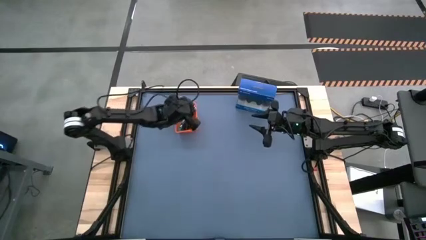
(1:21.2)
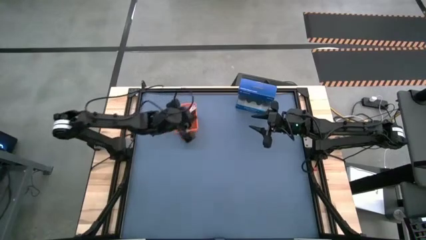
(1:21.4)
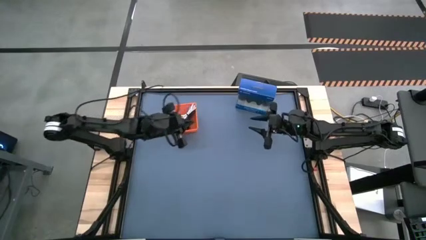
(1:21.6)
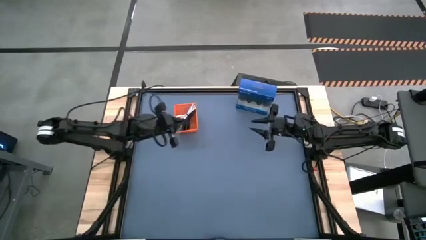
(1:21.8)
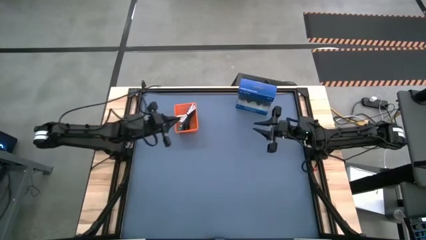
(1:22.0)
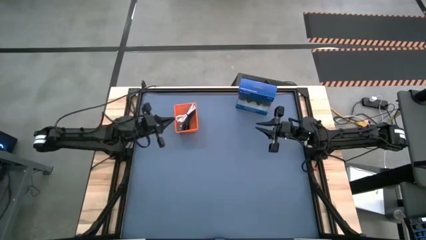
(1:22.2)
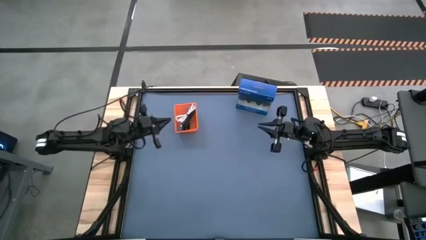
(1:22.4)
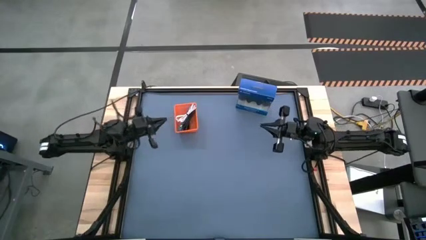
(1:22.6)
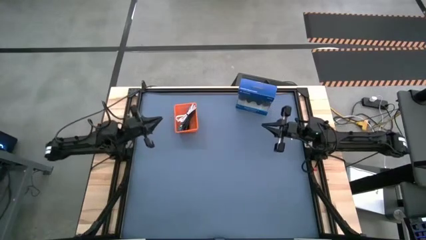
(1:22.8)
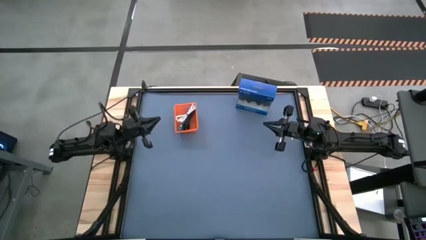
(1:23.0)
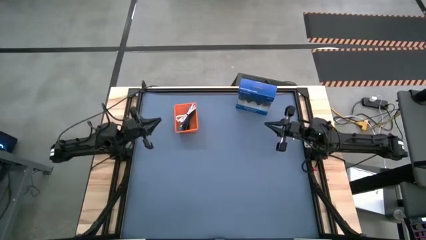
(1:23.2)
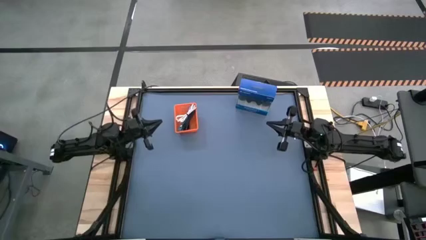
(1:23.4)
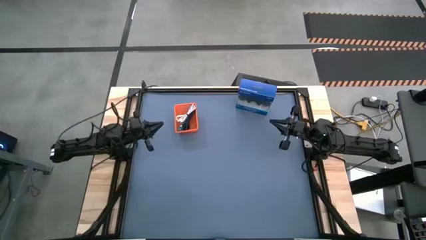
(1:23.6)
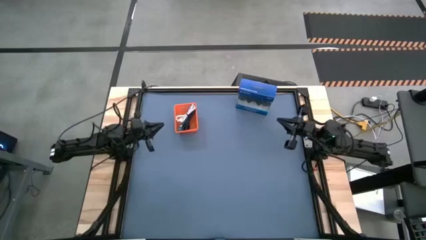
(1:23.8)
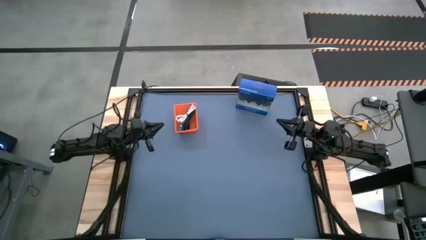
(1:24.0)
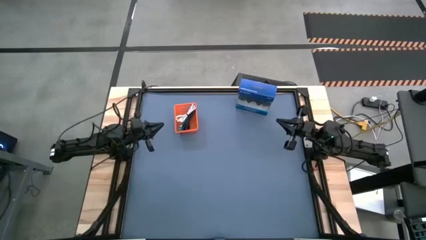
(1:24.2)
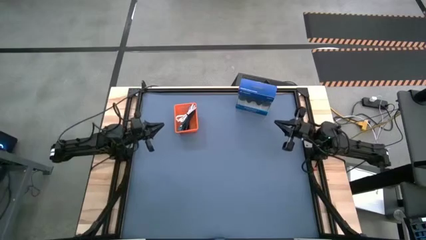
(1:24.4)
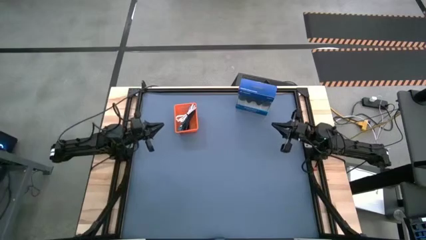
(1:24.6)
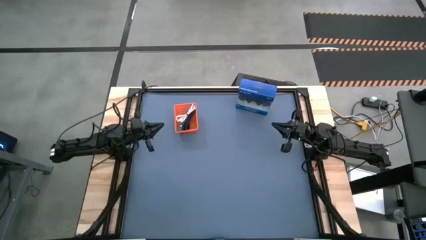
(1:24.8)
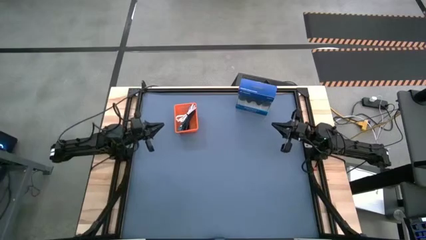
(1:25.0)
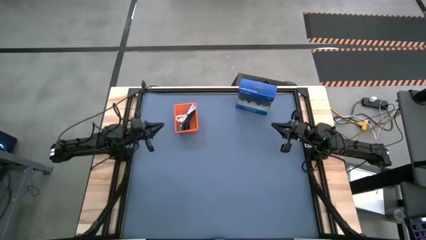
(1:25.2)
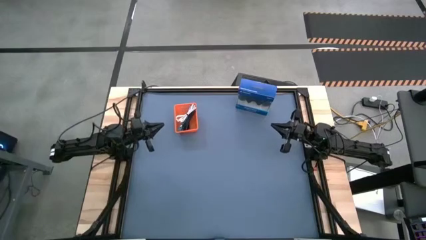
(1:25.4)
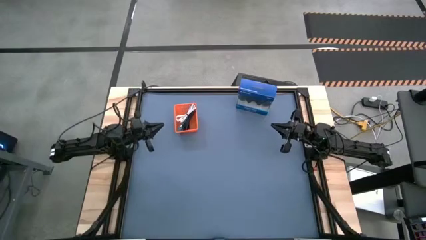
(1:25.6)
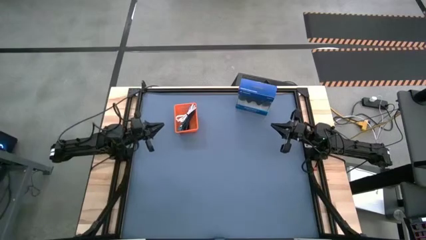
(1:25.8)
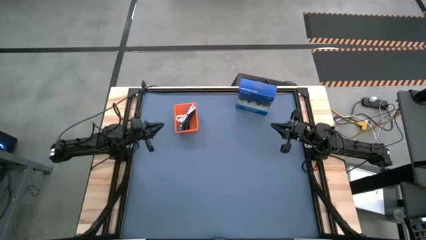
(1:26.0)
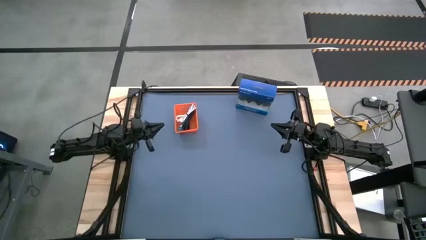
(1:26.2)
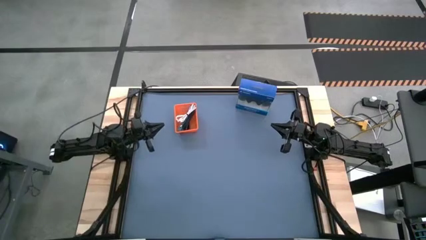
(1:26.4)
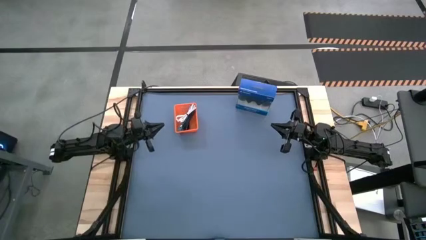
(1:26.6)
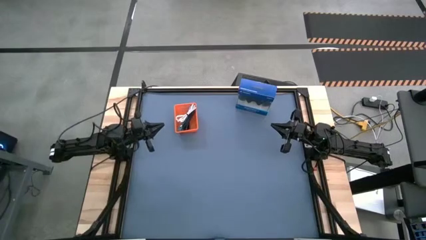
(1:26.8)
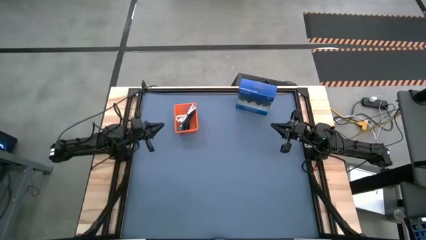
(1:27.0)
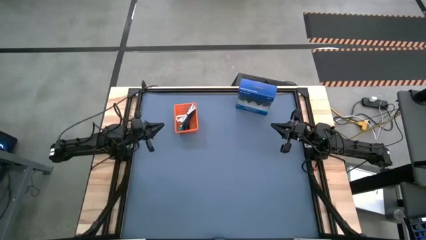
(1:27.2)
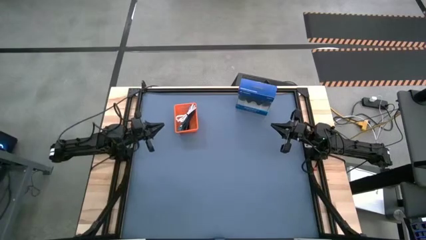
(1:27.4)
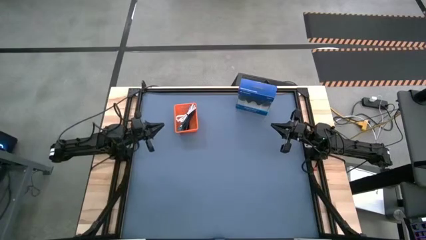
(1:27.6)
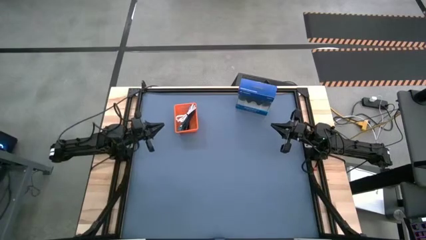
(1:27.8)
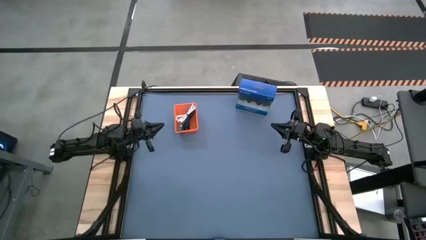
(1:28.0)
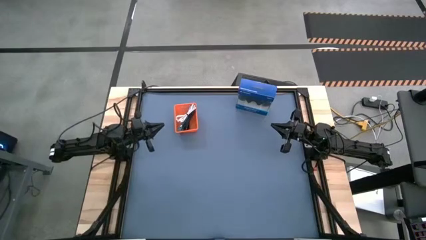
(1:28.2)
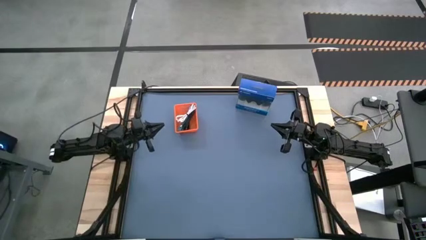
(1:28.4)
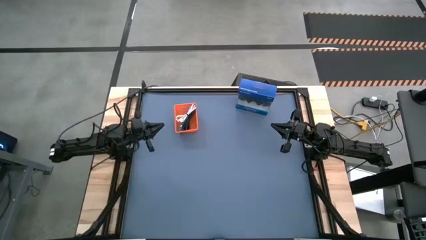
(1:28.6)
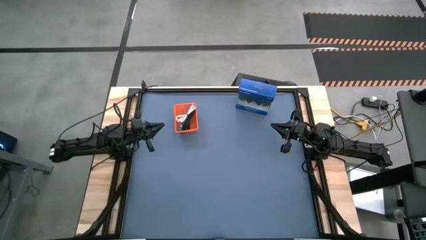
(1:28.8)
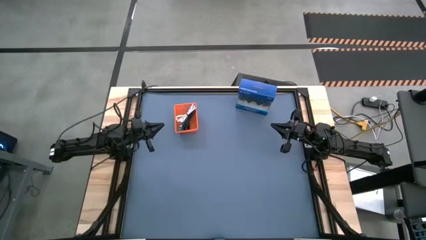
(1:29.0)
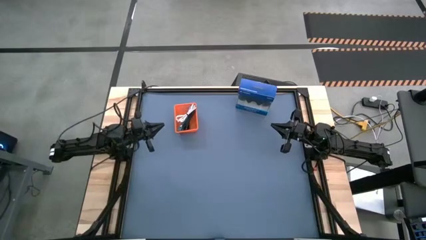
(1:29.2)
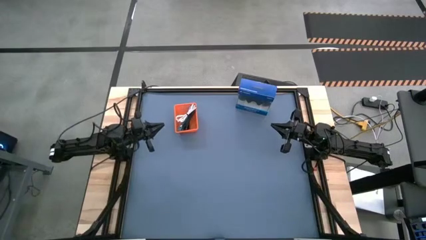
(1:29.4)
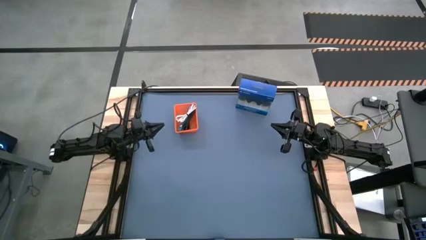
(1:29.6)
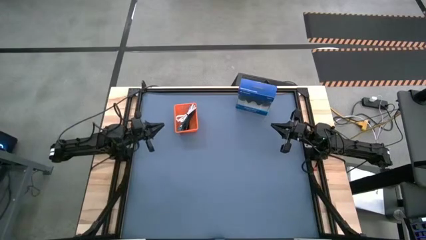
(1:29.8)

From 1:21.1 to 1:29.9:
Task: Pick and place USB-C Cables
Return to Home Position

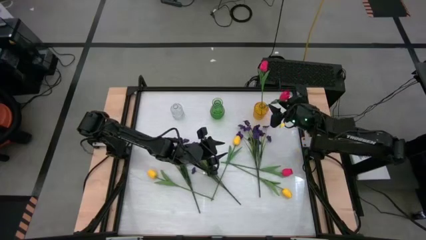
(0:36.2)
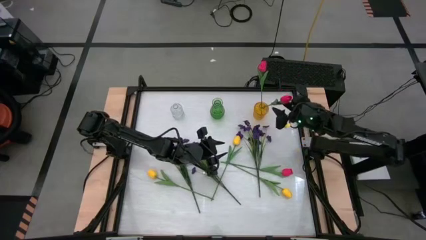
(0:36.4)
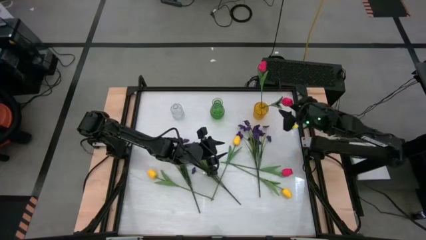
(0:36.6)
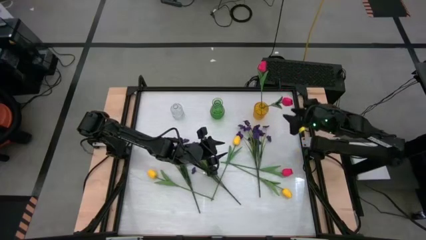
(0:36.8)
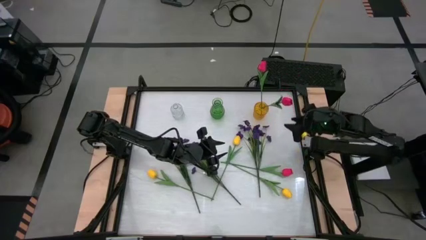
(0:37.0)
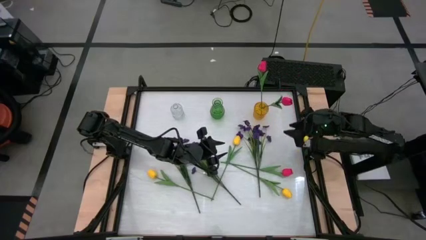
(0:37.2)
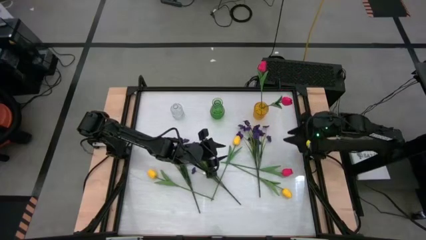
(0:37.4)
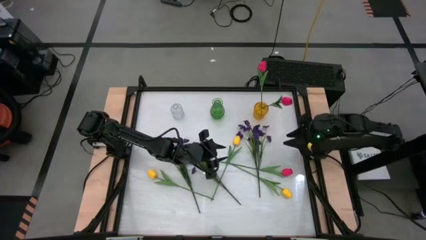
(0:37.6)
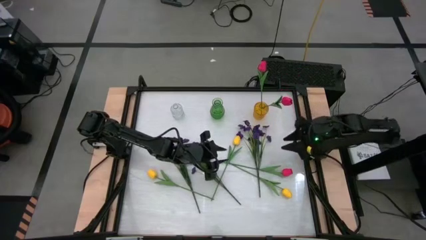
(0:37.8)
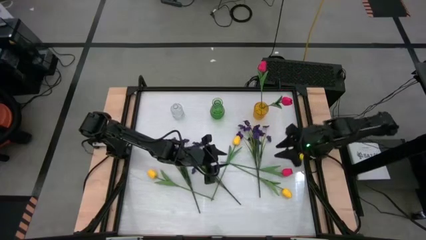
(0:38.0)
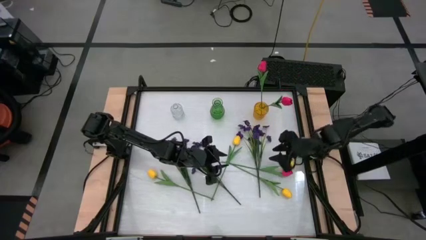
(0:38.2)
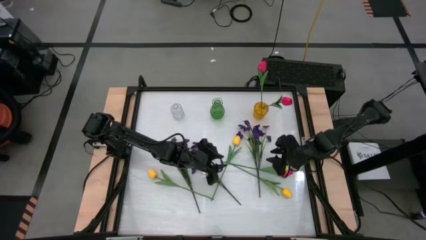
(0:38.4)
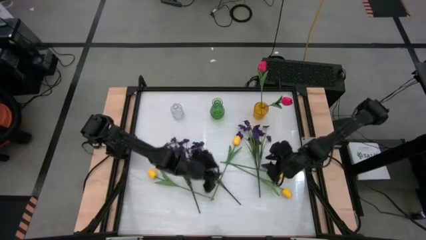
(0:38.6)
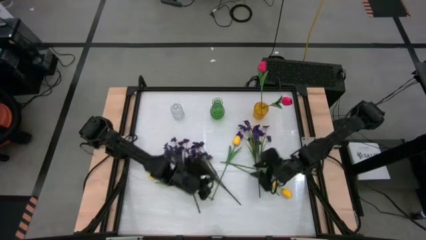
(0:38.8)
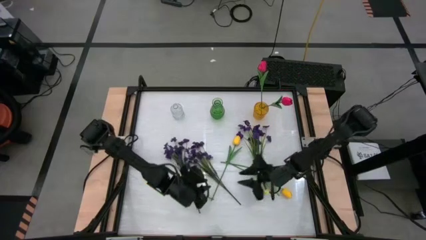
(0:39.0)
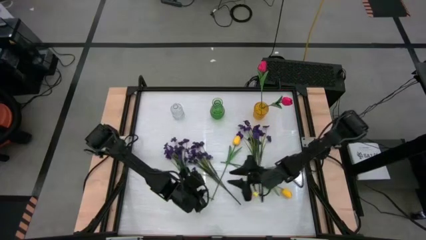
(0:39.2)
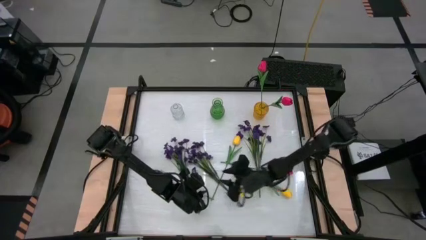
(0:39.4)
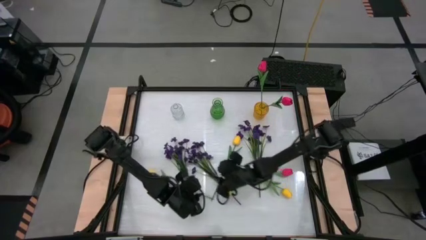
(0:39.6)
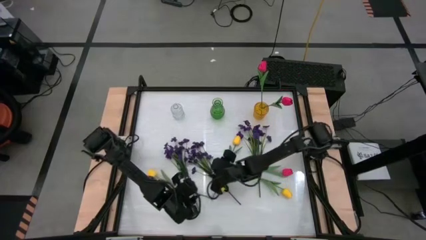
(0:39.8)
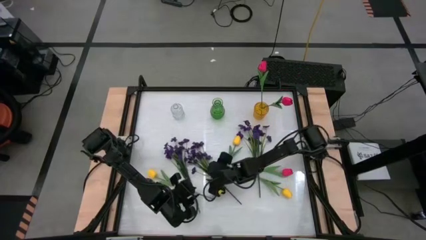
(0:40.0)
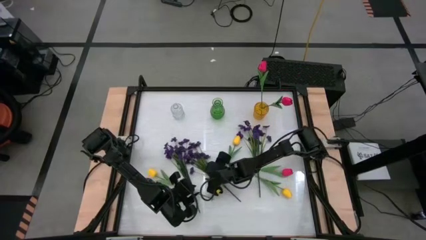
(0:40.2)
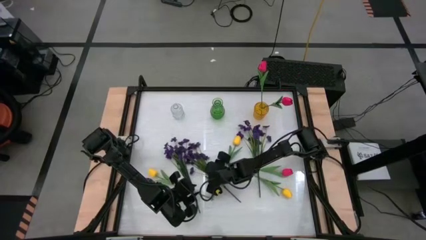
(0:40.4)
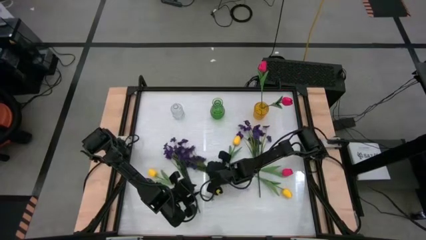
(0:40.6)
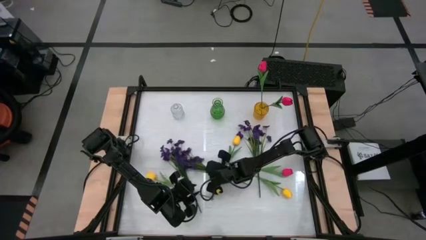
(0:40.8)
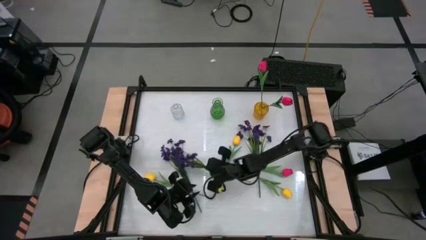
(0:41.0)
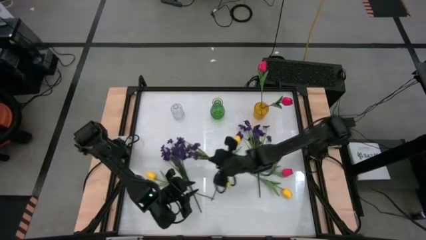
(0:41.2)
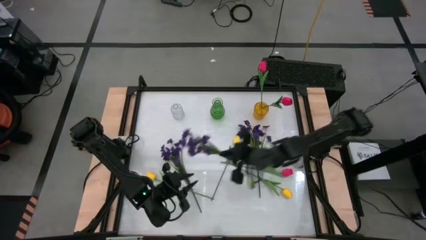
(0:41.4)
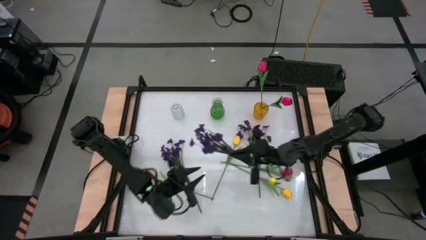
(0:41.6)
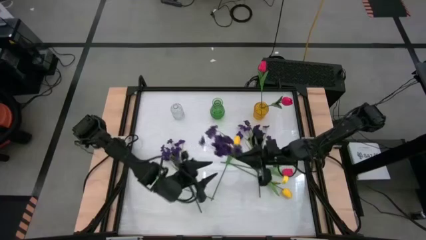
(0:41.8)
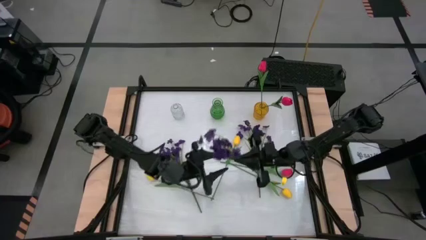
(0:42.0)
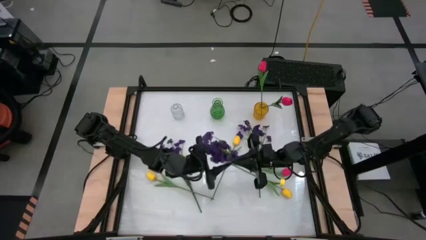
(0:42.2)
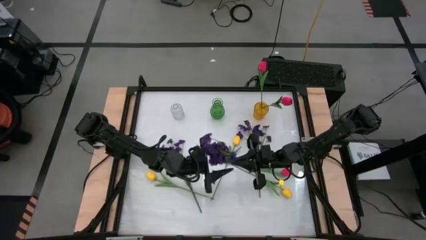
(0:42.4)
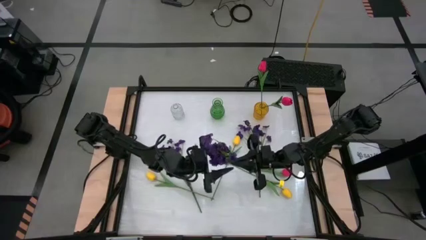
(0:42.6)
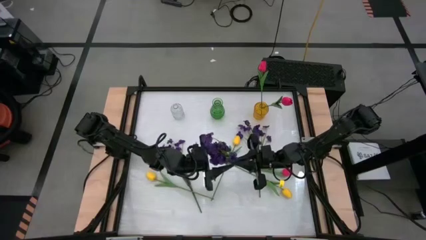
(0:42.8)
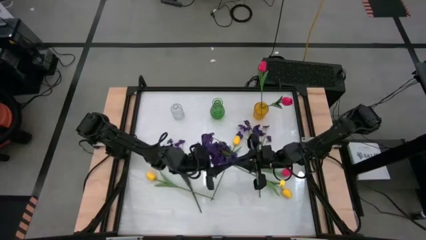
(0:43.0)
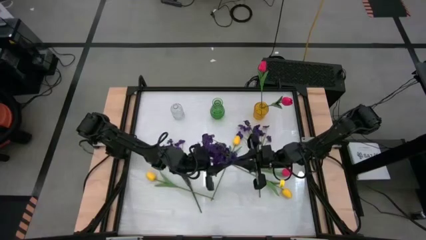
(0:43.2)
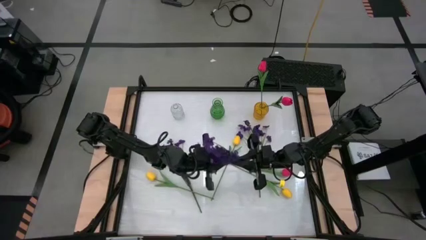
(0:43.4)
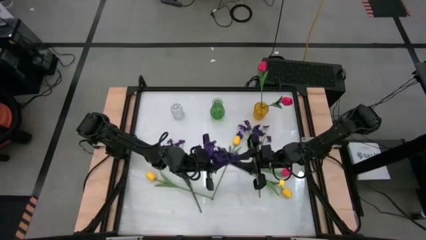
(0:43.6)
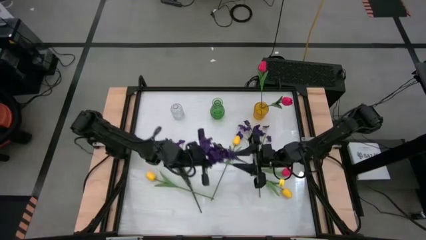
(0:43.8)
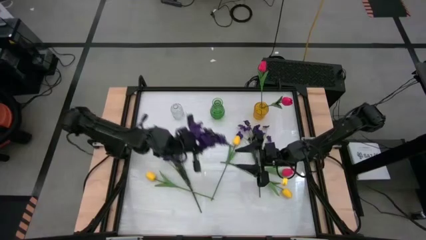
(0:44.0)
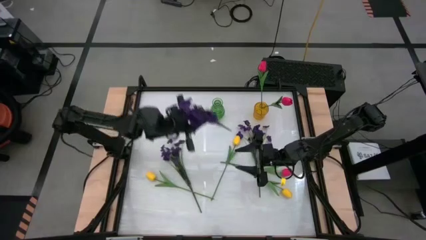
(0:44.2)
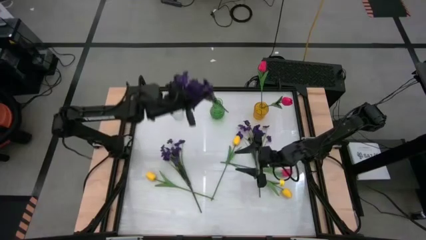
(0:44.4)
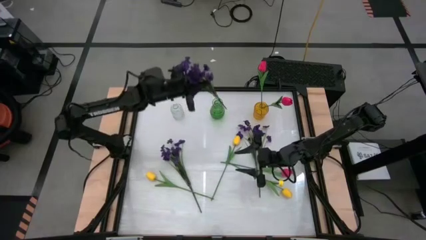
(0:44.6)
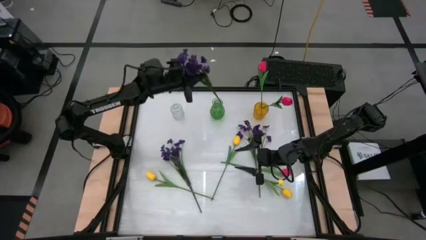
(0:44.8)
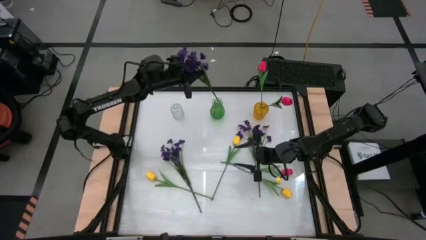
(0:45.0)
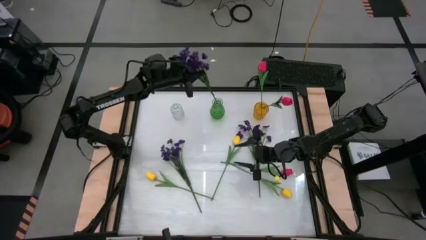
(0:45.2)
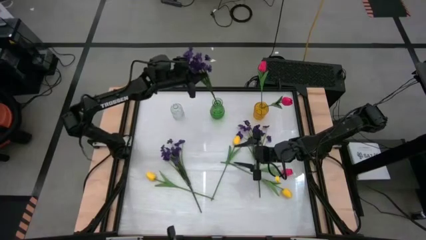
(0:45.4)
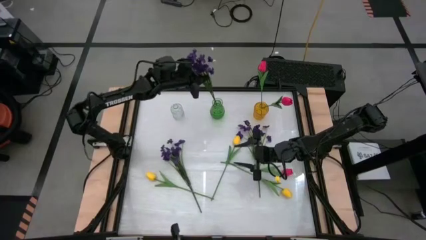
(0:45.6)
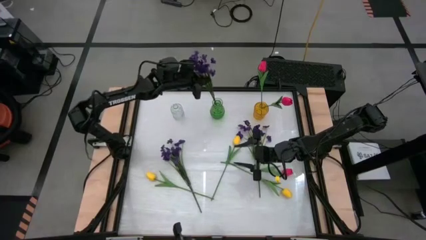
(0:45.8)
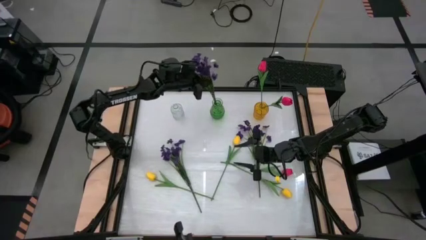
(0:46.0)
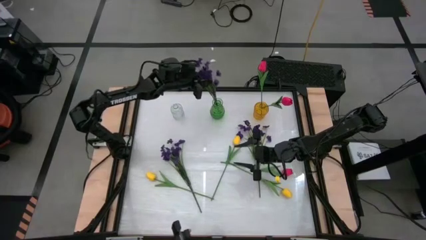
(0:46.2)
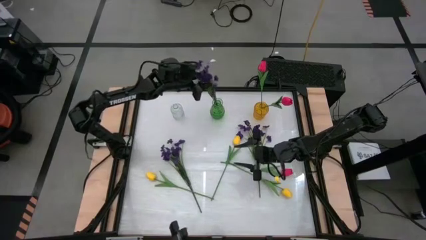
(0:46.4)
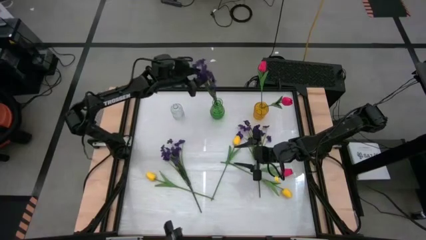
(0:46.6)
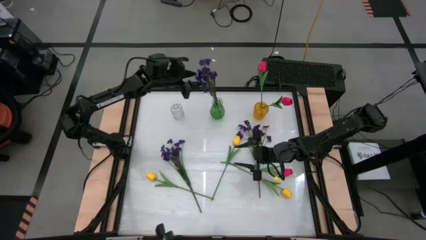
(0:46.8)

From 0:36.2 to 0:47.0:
Task: Sort flowers into vase by color
Put the middle purple flowers into the green vase
